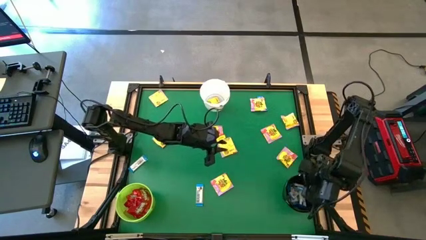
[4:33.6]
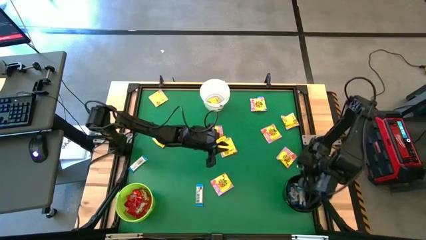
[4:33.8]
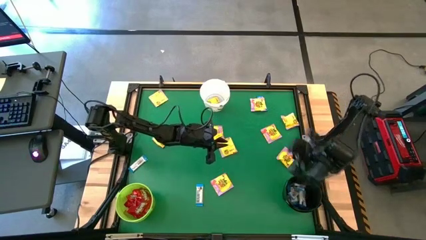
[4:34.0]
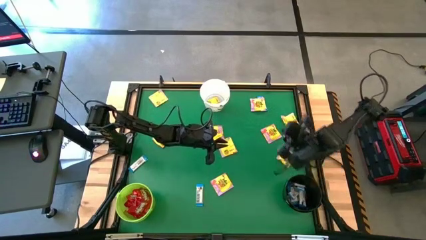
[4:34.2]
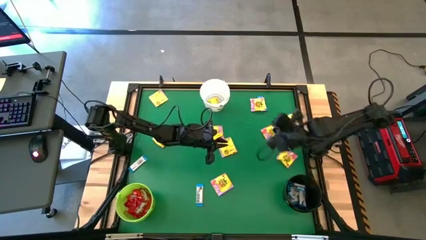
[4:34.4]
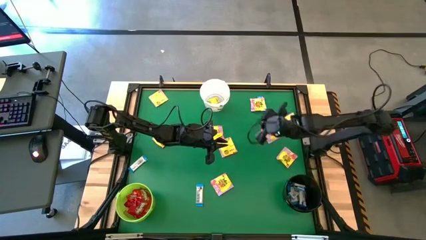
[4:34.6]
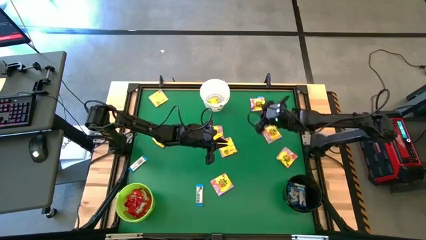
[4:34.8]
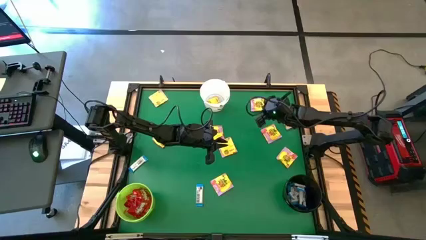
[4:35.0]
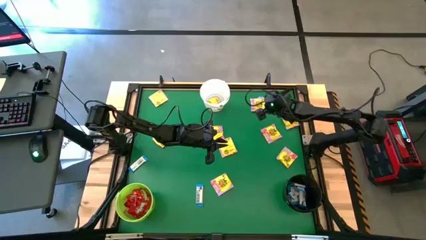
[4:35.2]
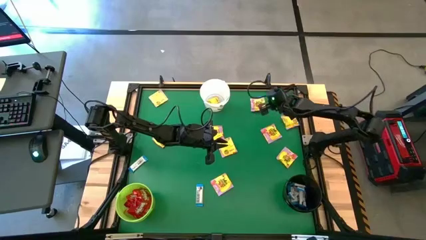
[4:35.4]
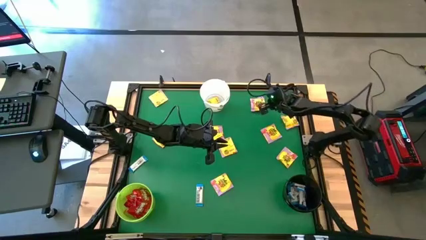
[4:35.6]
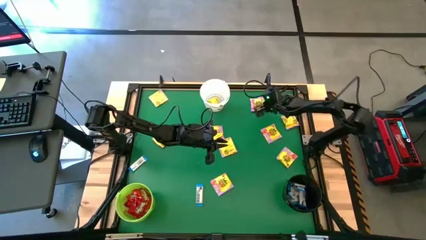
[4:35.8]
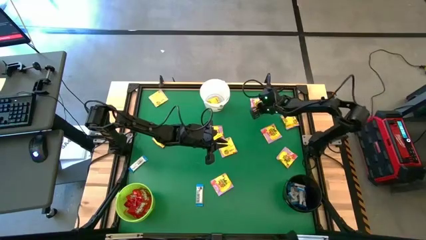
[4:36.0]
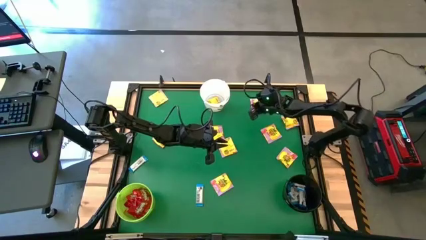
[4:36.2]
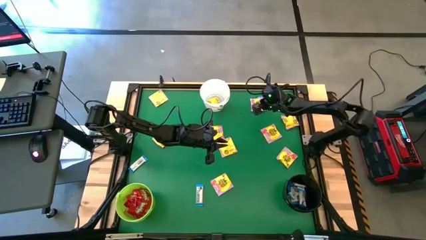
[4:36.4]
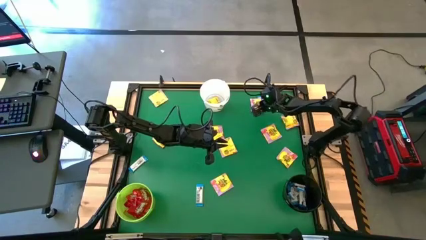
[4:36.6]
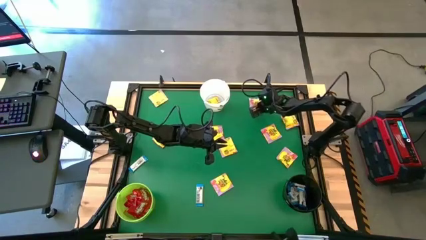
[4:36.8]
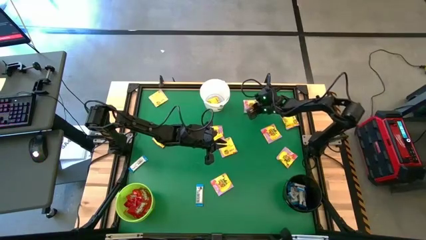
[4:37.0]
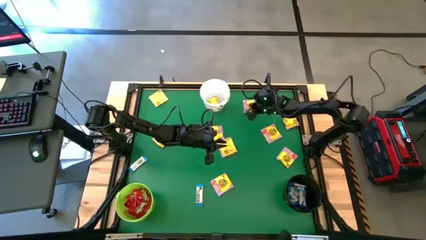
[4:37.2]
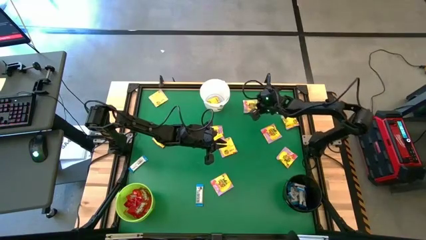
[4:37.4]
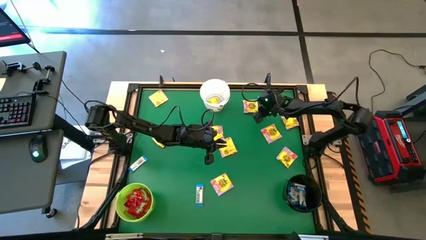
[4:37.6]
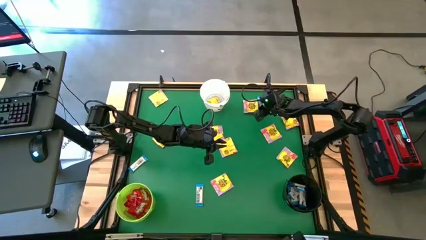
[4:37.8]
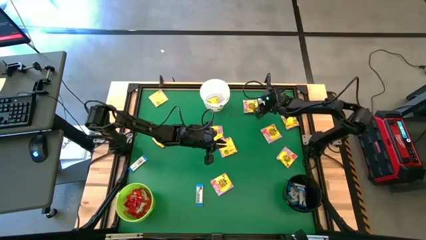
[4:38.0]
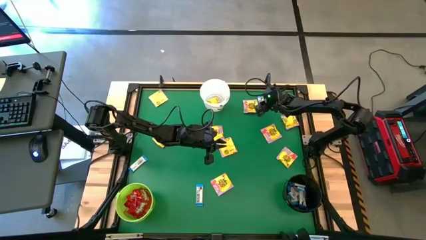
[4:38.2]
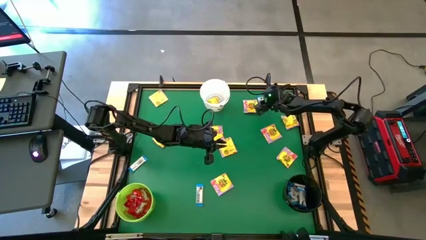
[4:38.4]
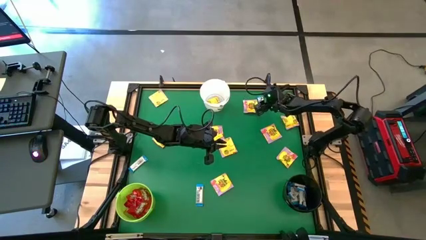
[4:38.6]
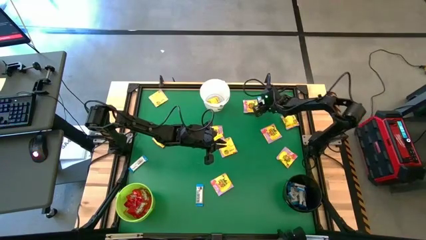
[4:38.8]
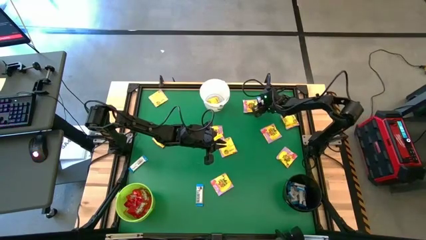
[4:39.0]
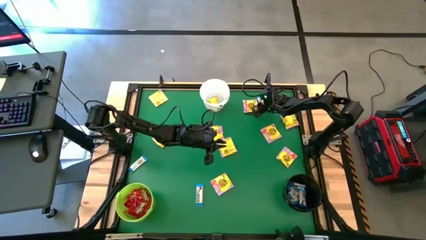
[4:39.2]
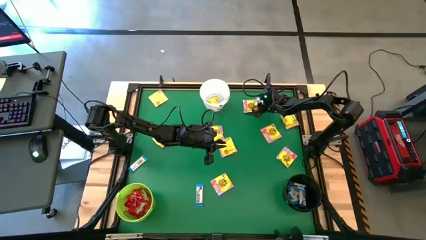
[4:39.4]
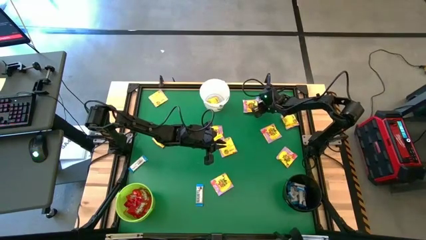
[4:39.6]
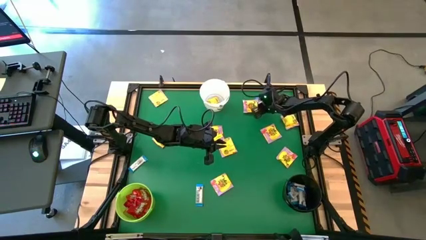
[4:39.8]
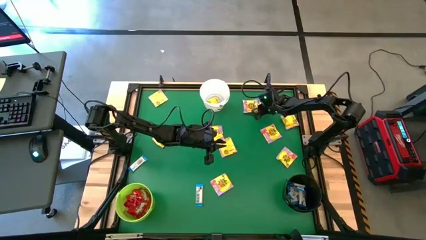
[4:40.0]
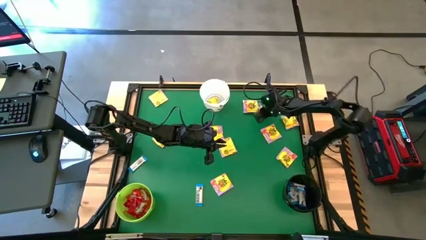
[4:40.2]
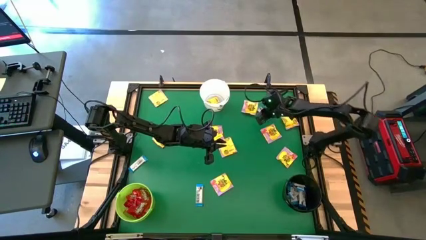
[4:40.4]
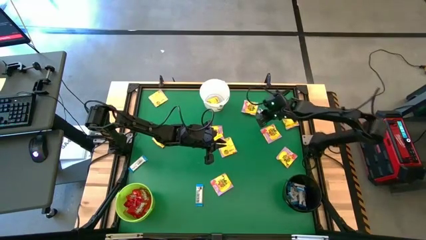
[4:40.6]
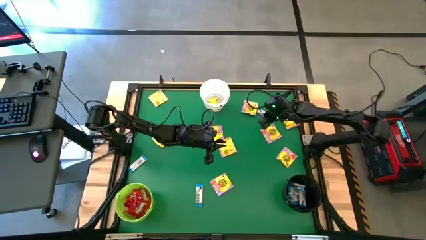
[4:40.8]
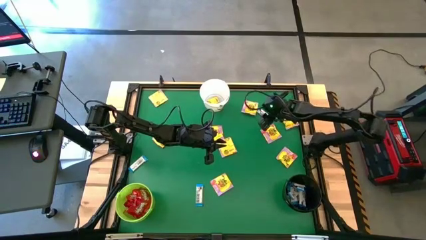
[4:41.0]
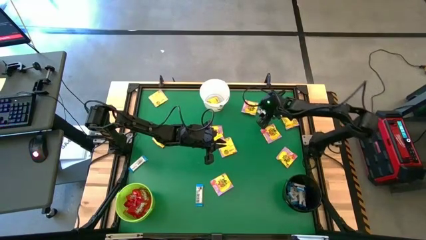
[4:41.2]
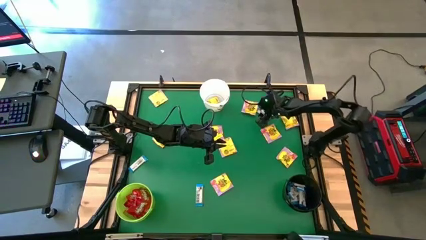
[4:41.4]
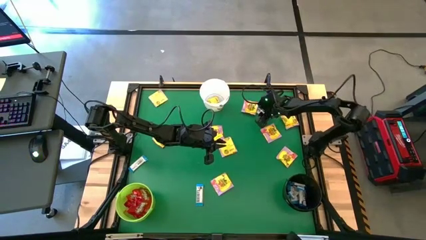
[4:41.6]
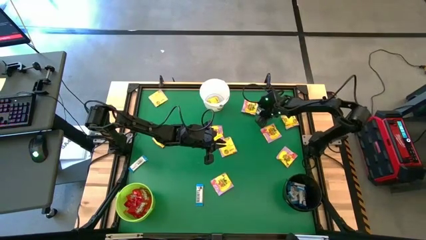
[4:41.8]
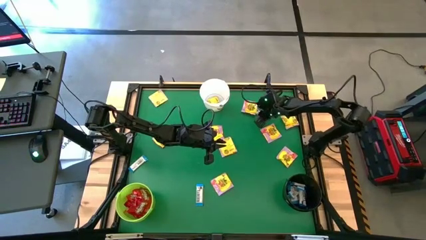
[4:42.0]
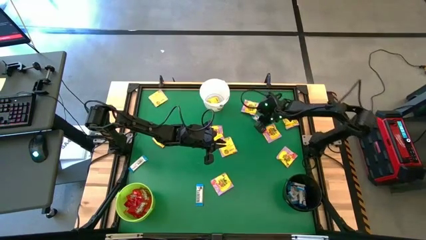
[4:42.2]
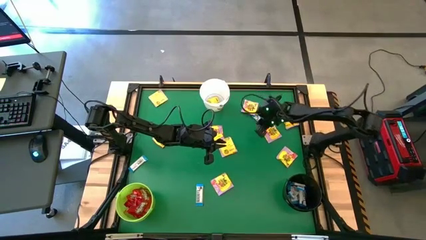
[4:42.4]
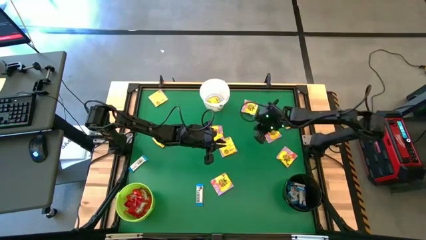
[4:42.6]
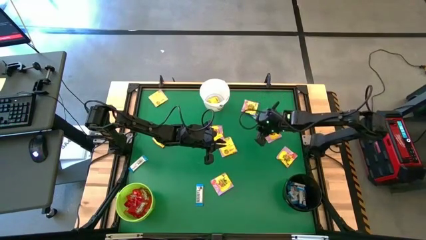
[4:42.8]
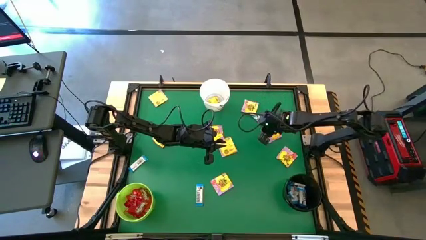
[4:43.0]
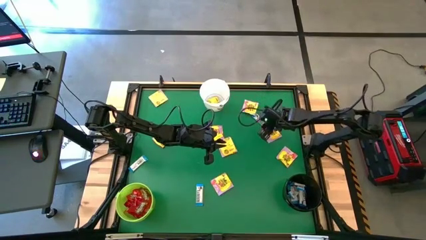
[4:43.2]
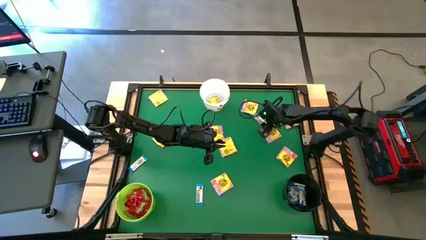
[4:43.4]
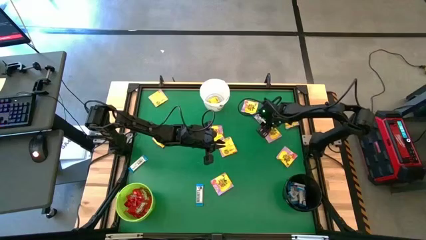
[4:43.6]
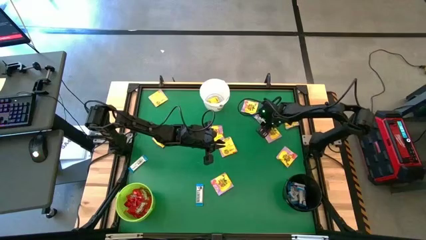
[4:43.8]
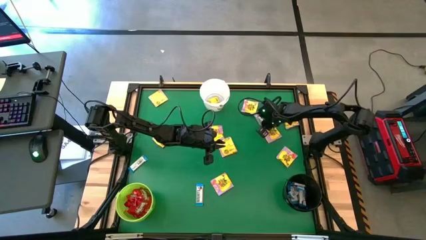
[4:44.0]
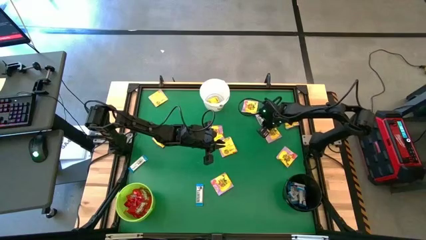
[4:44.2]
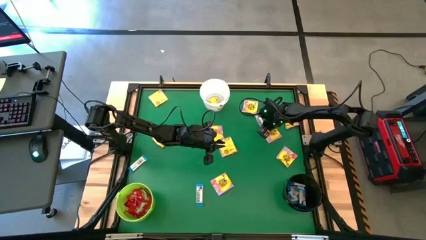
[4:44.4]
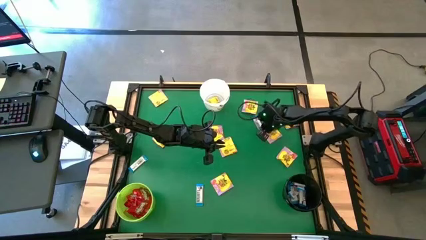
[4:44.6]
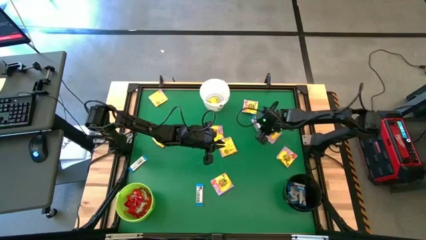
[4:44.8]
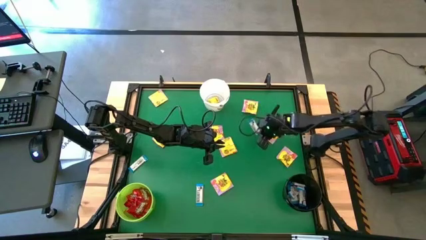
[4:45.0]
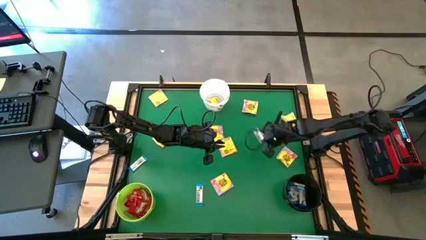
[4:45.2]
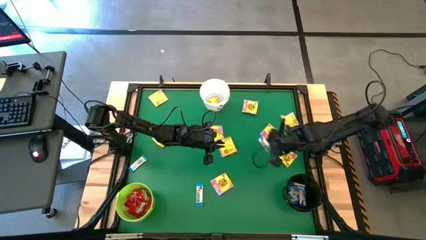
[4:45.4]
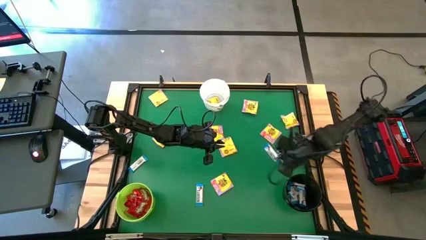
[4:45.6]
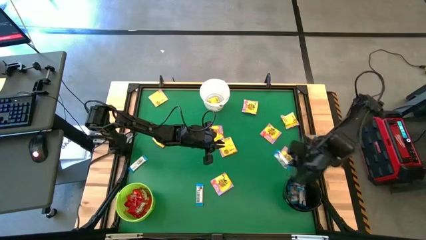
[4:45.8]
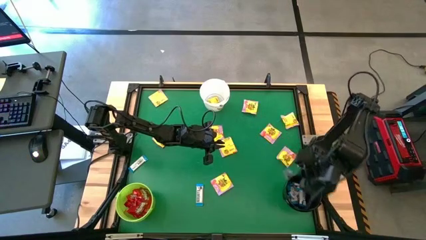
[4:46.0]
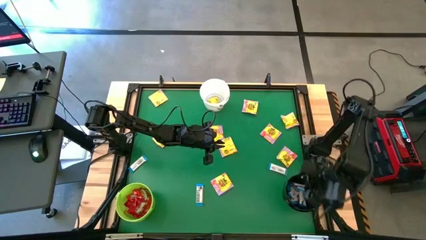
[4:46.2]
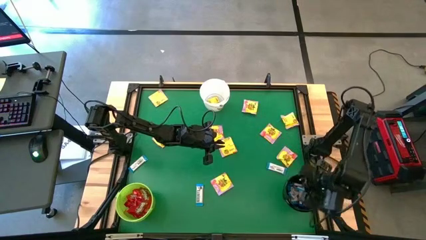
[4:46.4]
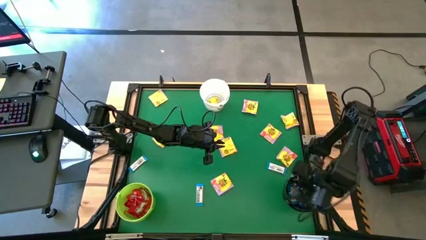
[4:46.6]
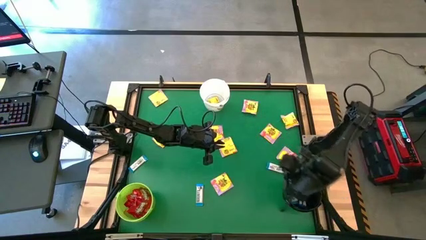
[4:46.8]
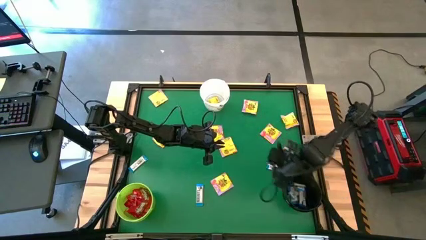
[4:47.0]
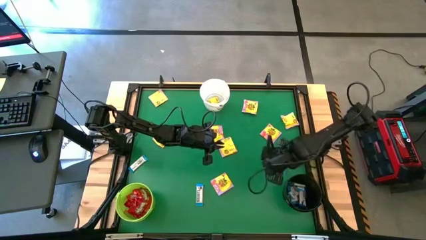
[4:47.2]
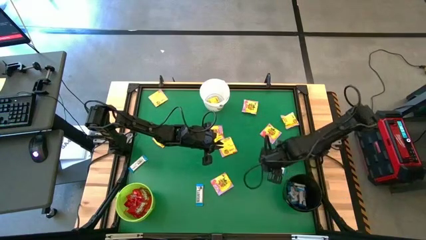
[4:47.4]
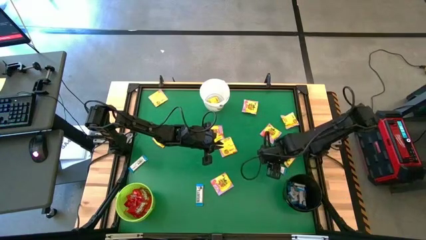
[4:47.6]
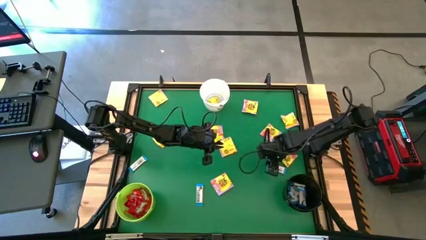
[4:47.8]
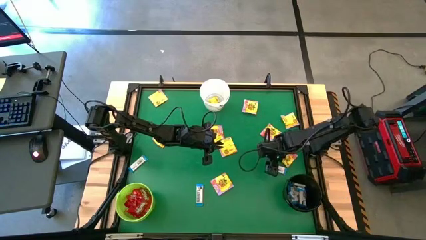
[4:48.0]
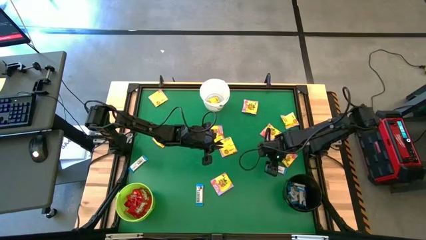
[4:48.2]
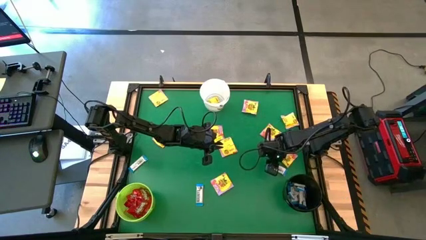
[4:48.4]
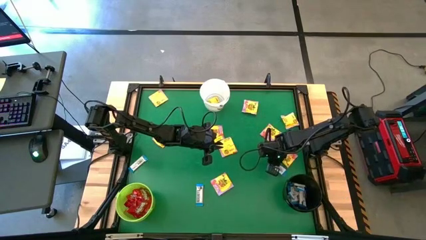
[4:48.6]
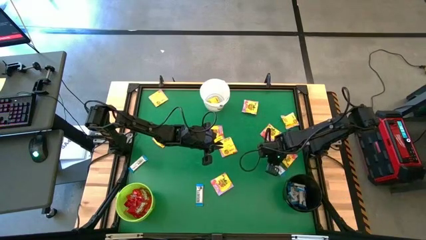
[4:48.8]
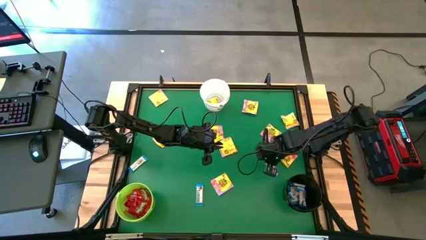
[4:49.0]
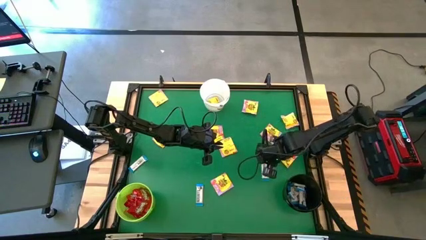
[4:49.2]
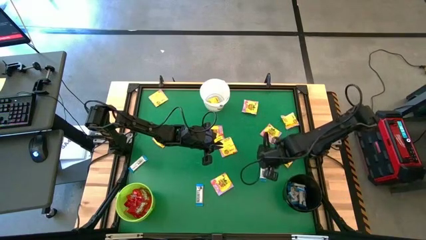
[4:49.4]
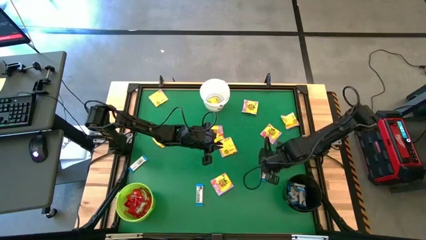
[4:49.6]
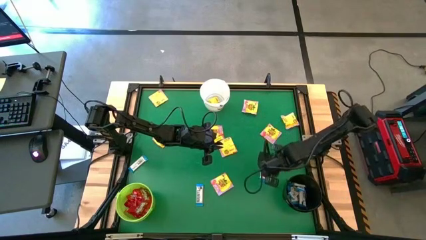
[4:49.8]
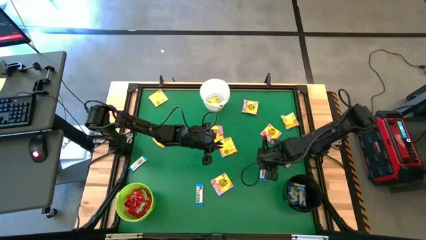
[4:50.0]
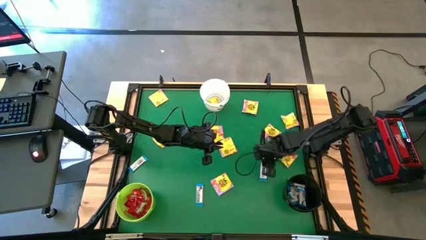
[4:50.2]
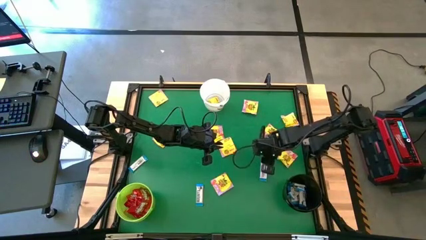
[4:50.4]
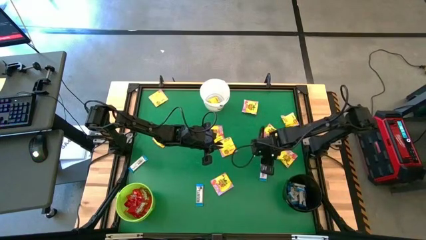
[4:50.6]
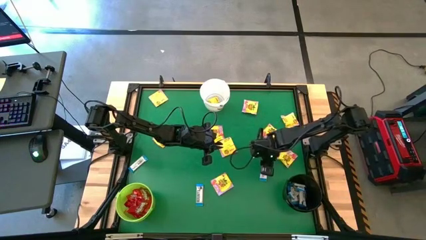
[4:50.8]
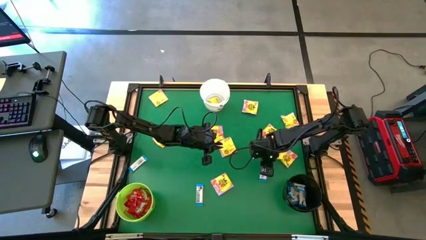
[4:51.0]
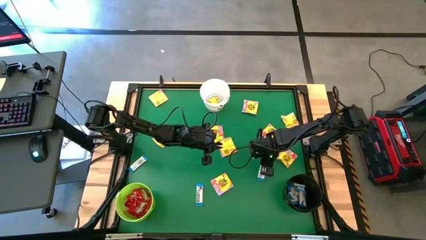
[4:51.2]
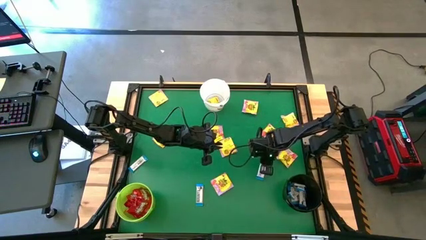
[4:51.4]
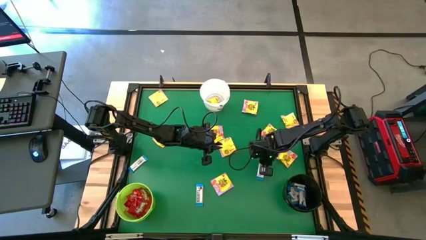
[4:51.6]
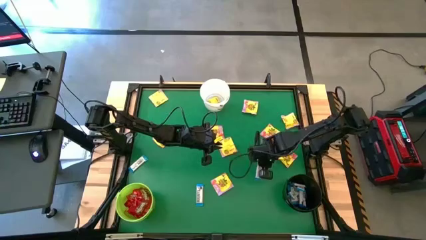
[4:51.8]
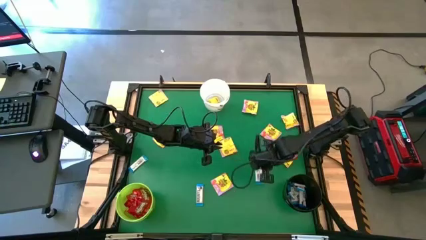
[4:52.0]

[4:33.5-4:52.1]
Task: Sort candy by brand, put in halloween buckets
Put the white candy into the black bucket
